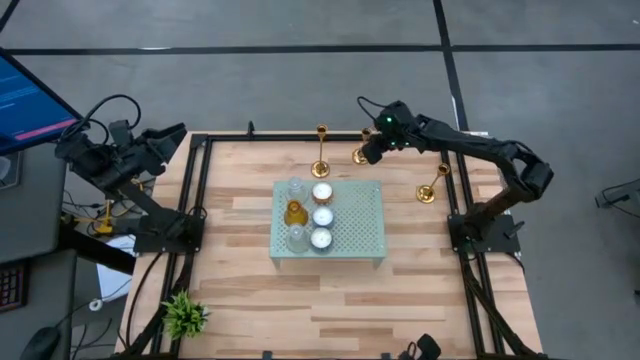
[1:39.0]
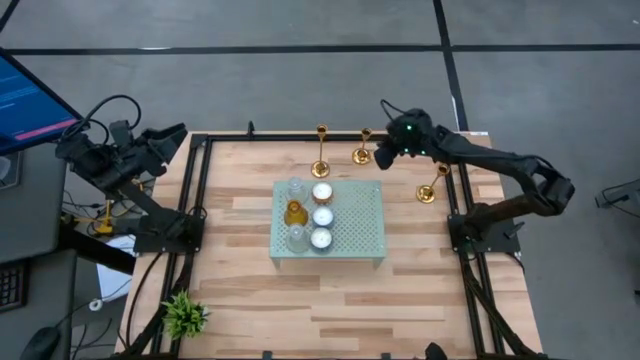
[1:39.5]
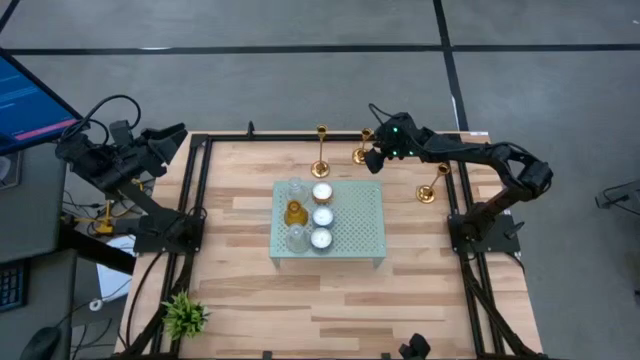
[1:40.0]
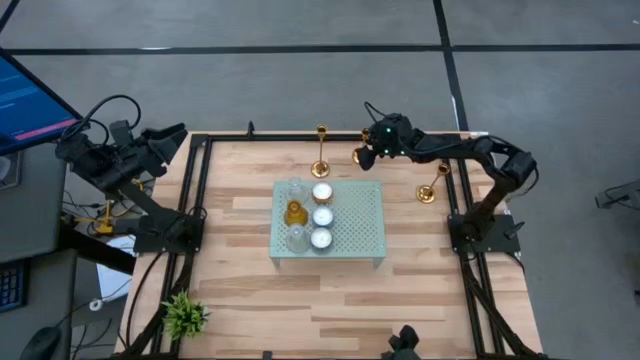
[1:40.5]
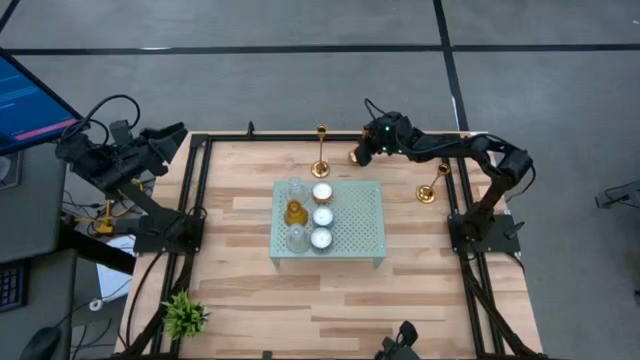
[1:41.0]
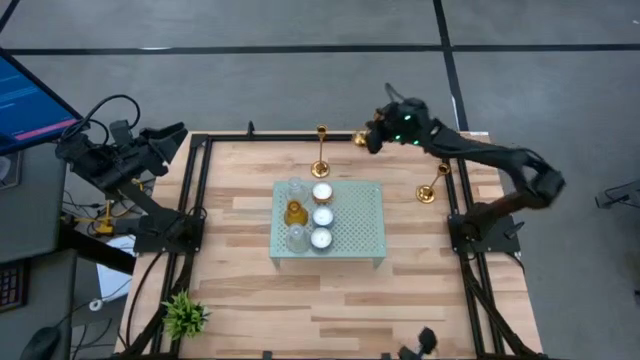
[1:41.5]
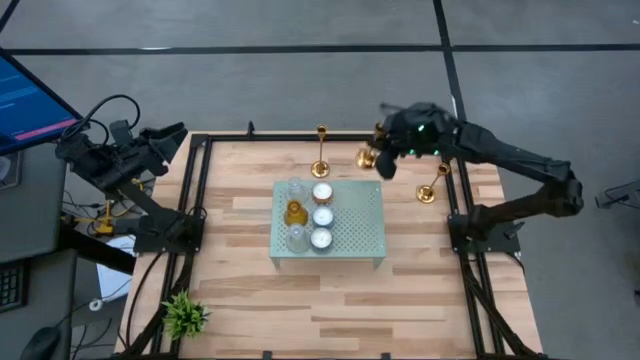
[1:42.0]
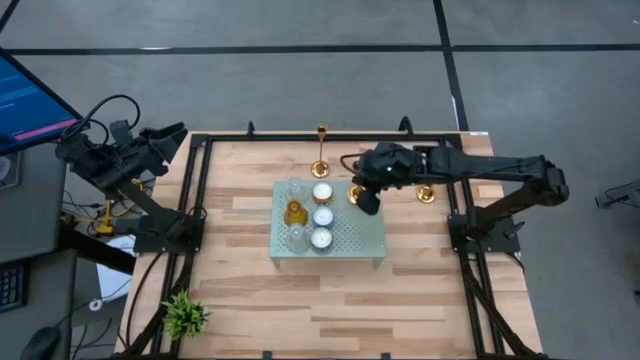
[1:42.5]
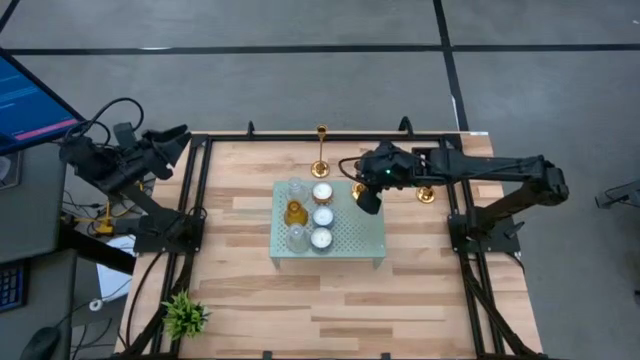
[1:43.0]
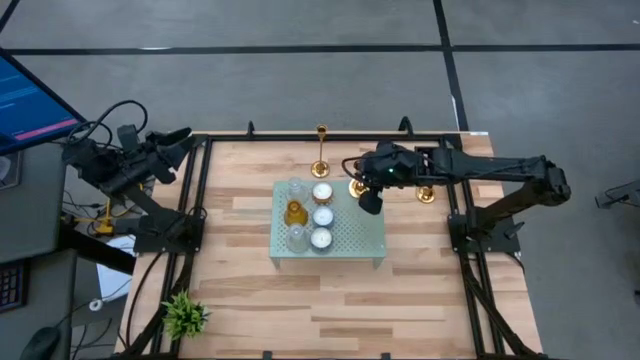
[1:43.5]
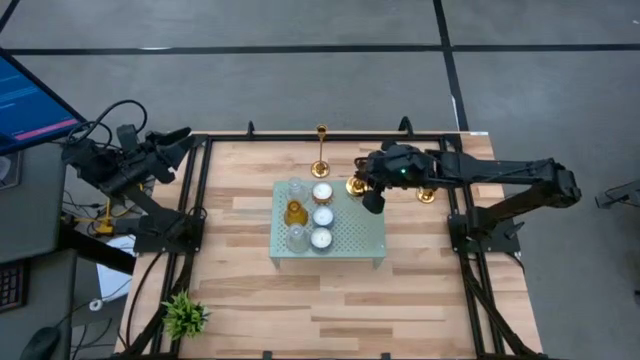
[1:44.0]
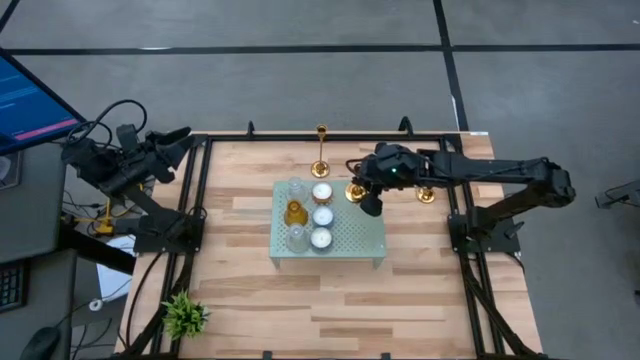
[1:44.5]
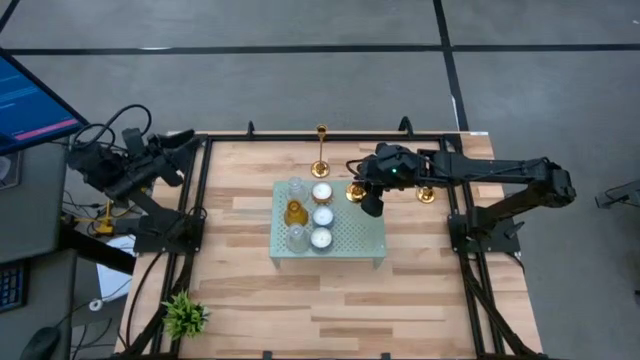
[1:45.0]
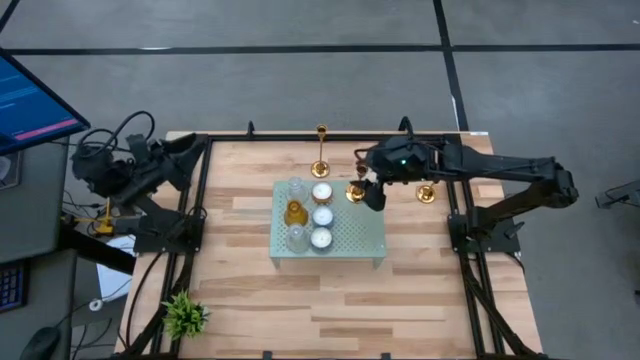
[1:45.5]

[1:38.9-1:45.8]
Task: Pick & Place candle stick holders
Put the middle gold candle holder on the shelf

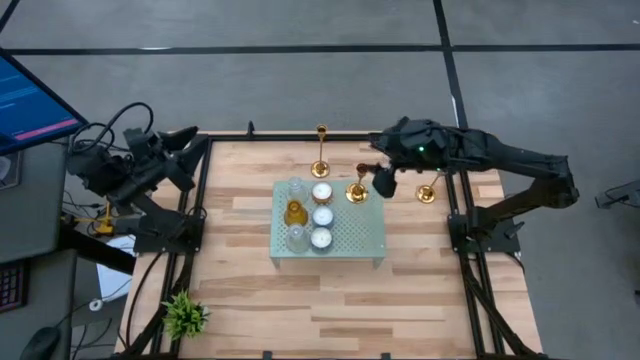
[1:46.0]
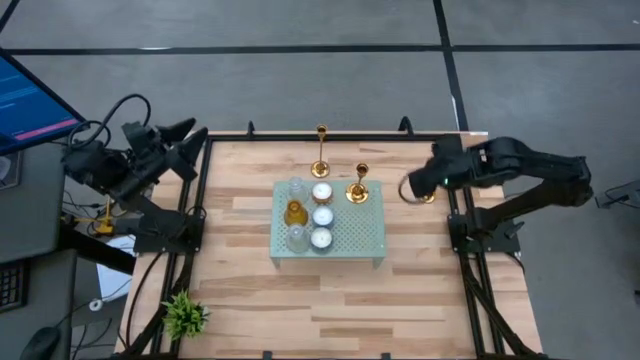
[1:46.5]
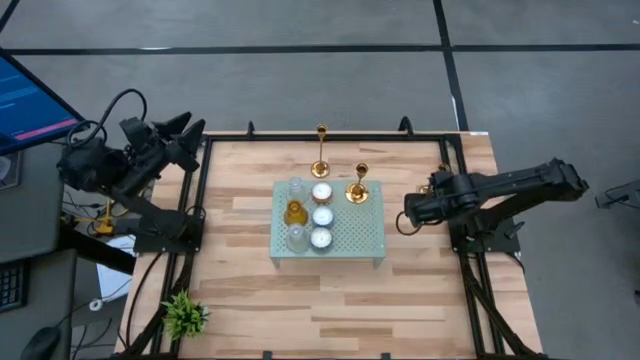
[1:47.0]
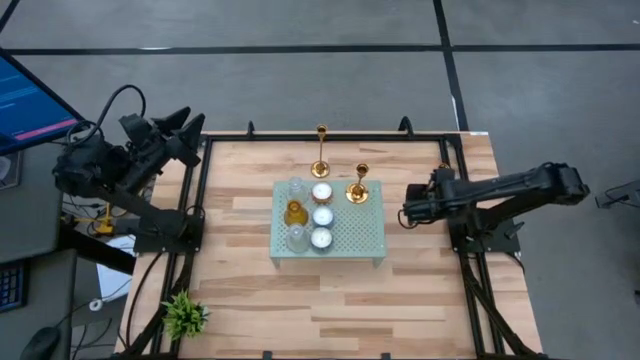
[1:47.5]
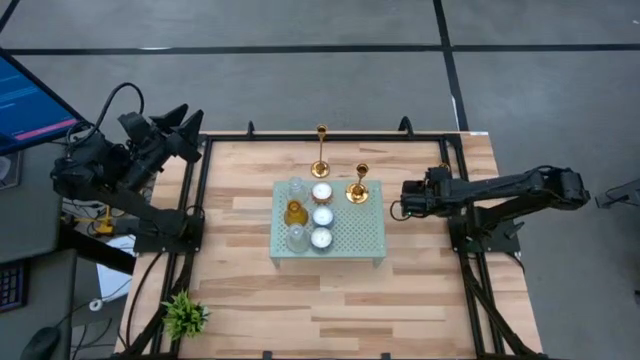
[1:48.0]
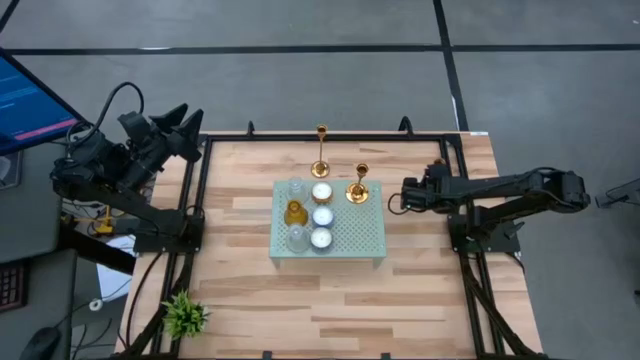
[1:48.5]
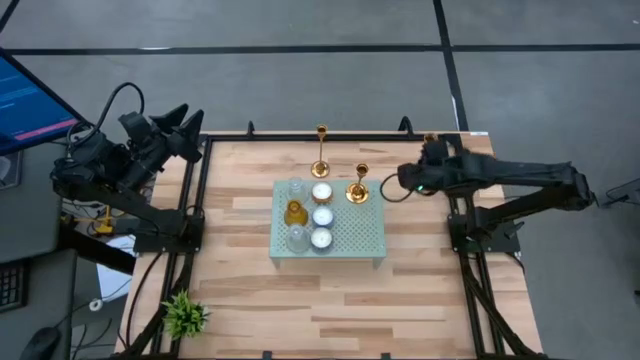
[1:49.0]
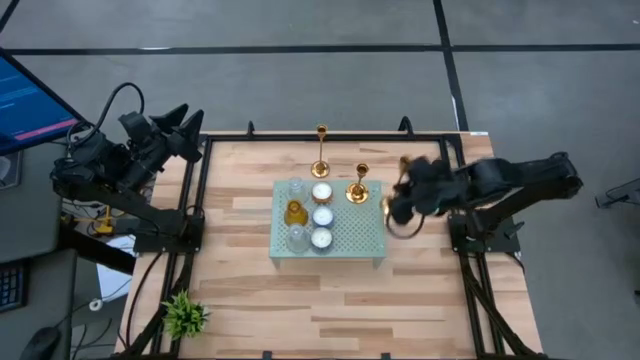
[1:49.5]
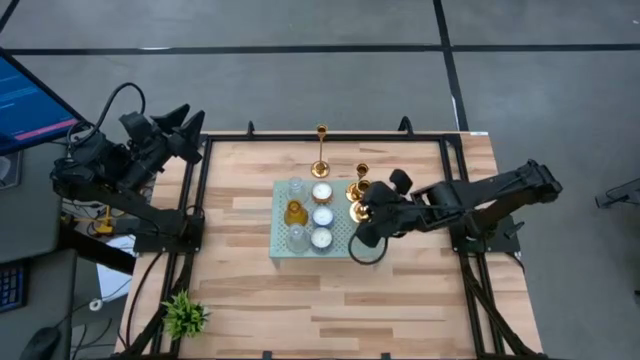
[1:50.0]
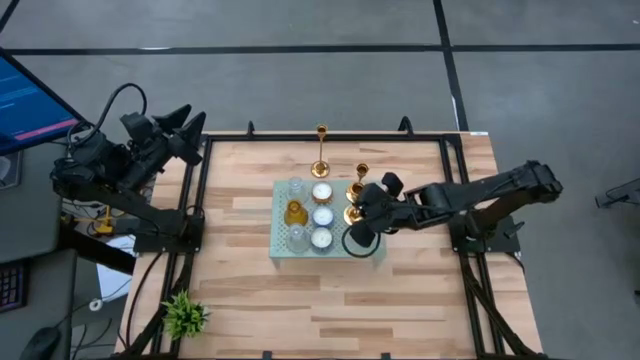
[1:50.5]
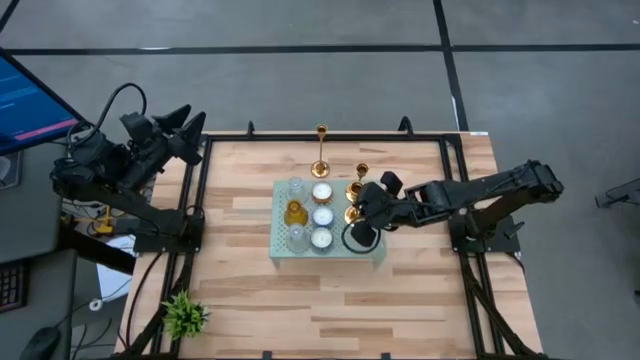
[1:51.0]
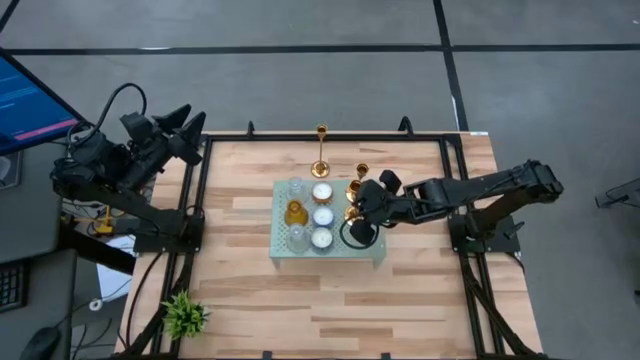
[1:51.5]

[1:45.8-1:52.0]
Align the right gold candle holder with the other blue scented candle on the shelf

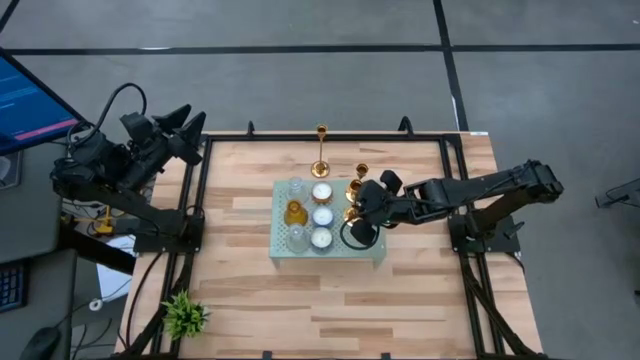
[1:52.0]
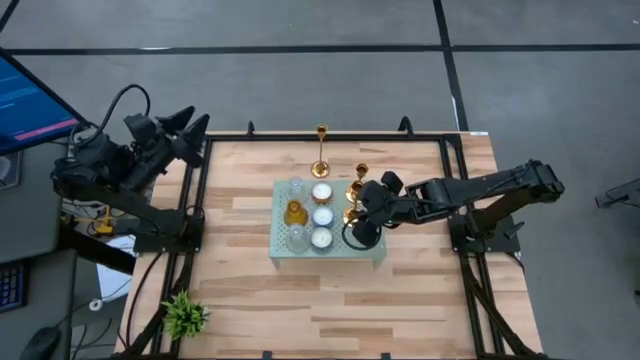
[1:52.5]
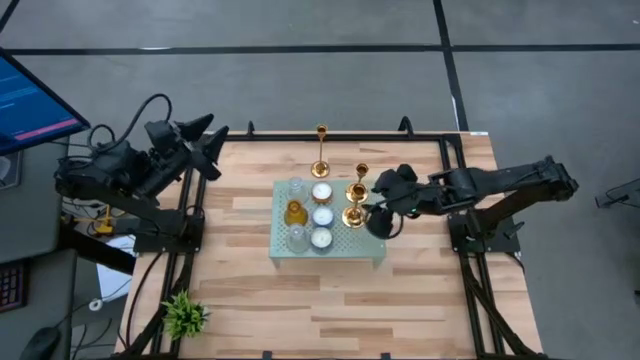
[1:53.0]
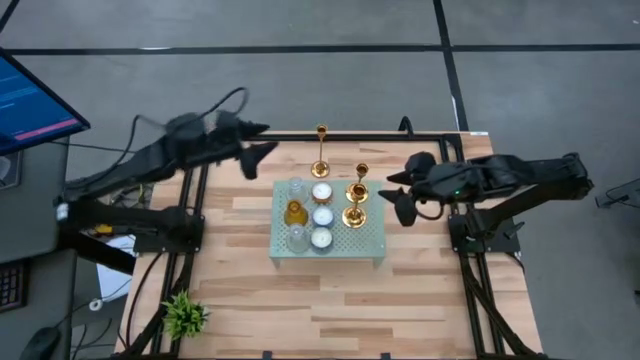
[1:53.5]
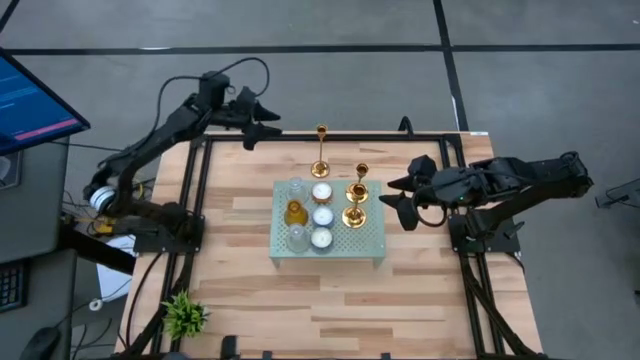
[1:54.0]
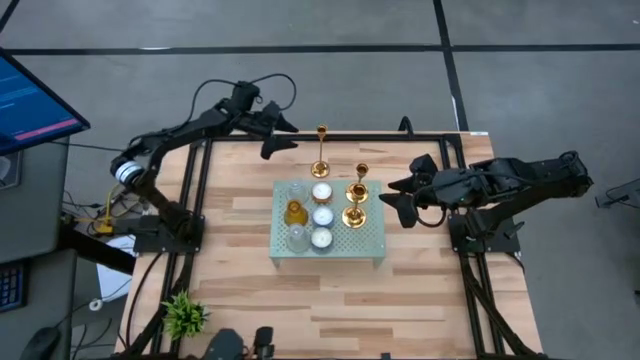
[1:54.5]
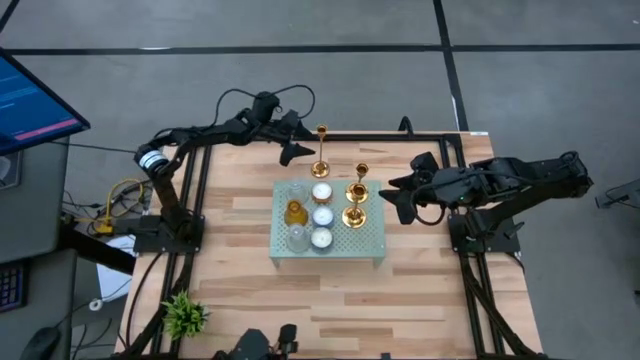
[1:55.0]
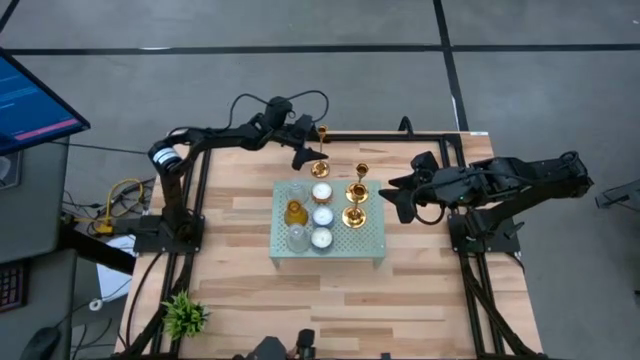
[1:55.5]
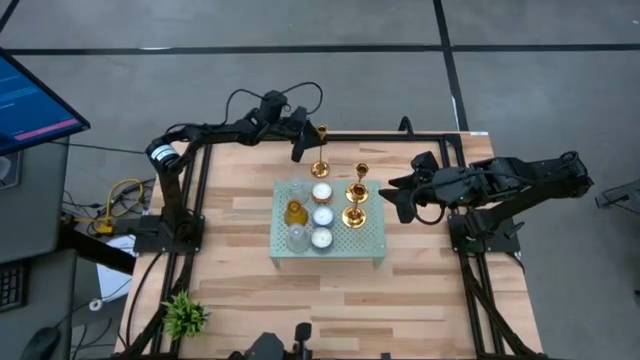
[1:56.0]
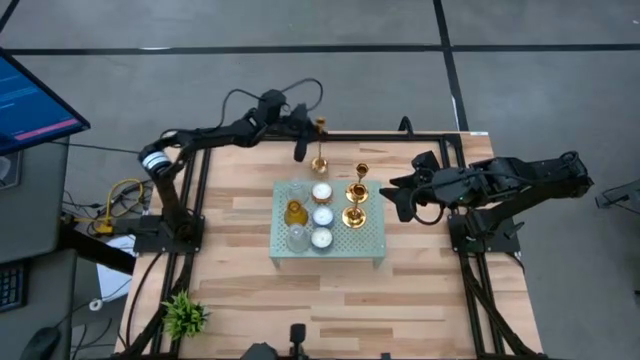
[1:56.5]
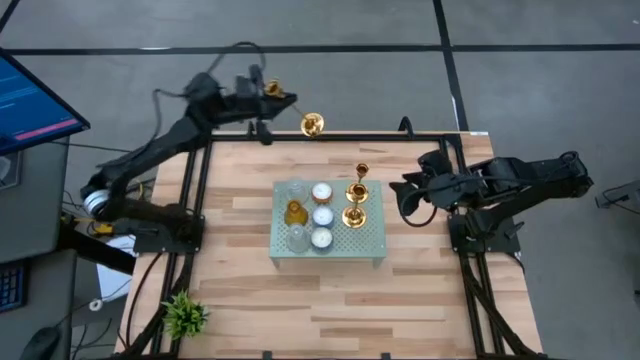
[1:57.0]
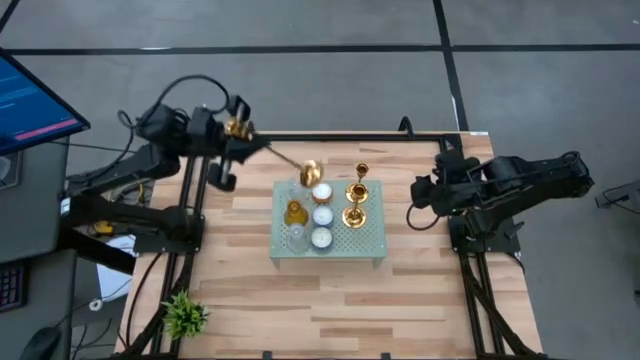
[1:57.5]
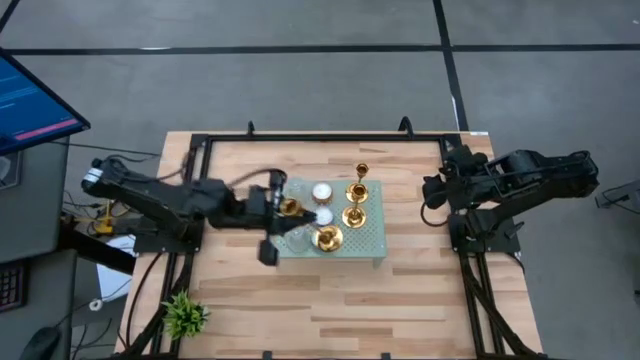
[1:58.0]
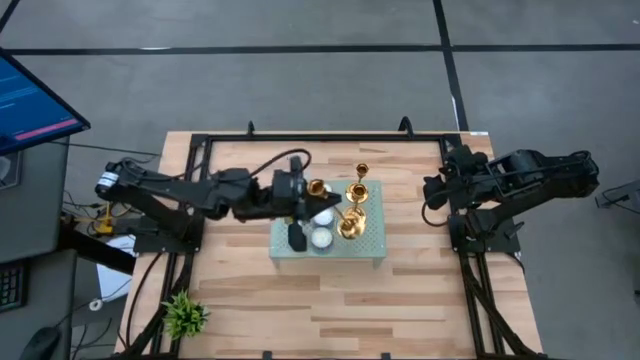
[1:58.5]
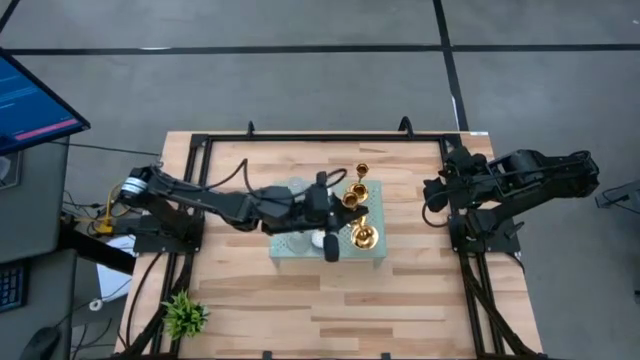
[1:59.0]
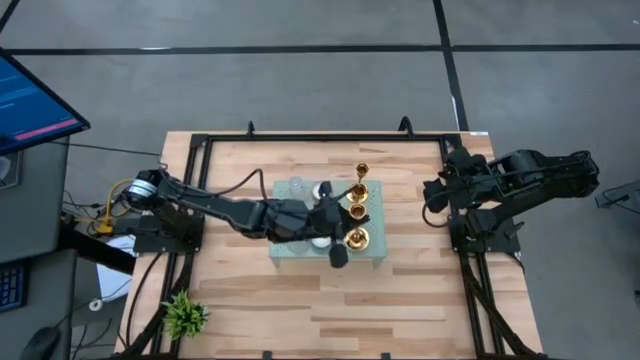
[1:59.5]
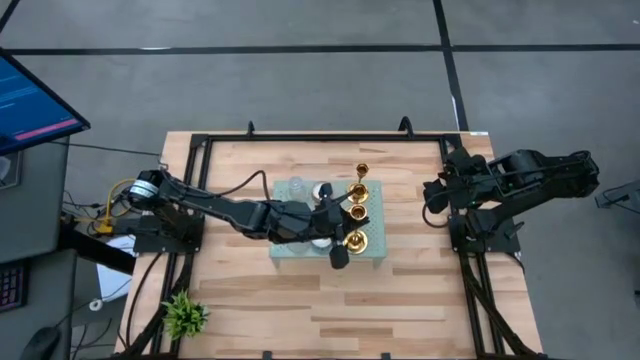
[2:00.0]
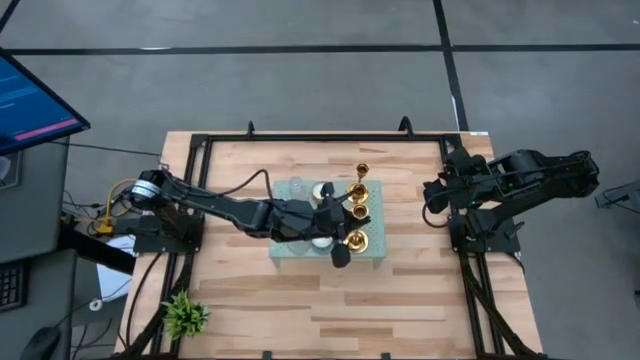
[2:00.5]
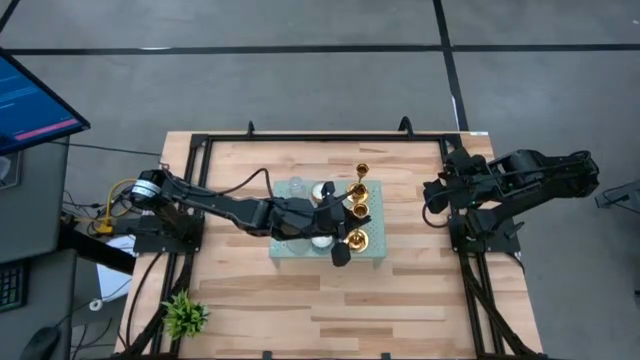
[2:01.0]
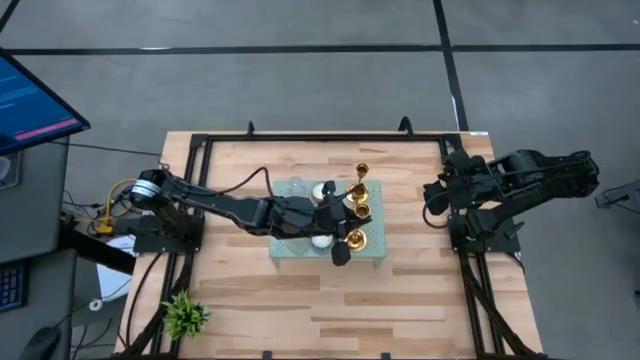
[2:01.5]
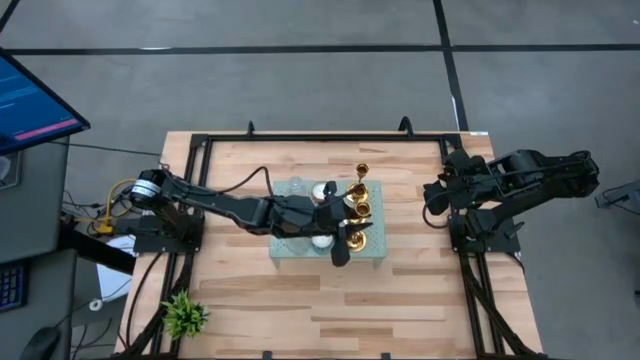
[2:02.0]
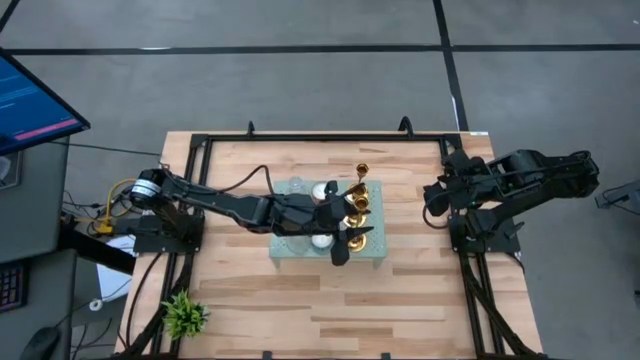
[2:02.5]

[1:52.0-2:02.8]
Align the gold candle holder with the other blue scented candle on the shelf
